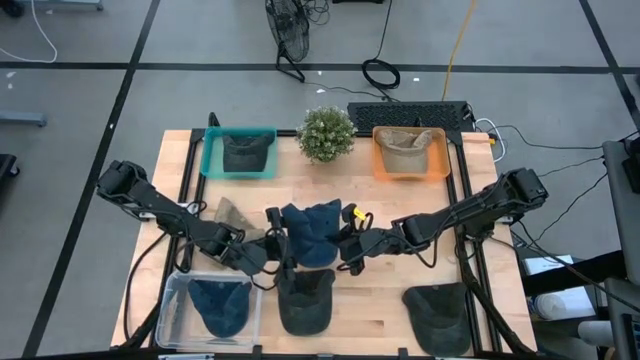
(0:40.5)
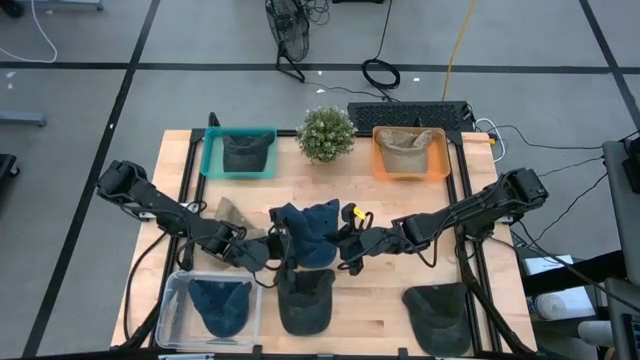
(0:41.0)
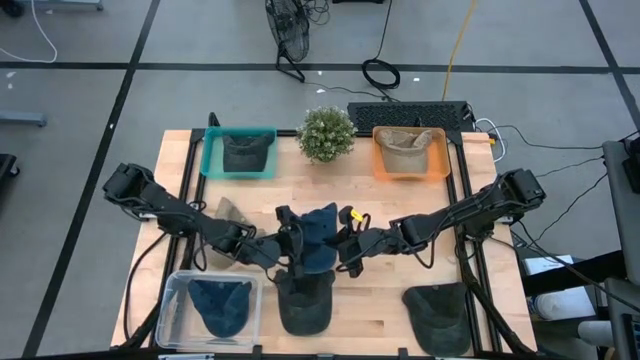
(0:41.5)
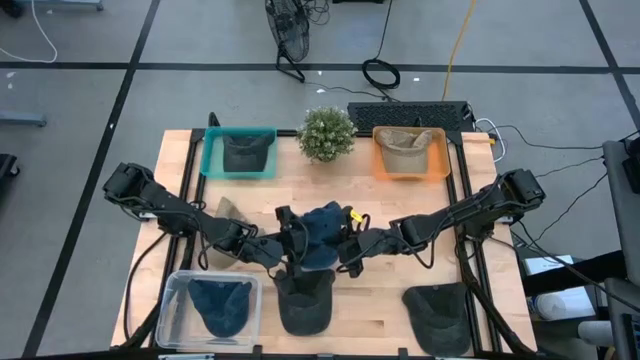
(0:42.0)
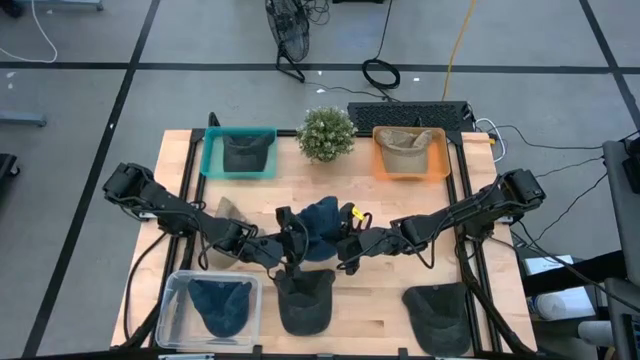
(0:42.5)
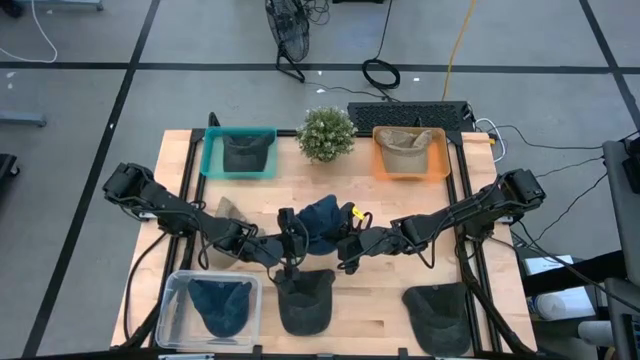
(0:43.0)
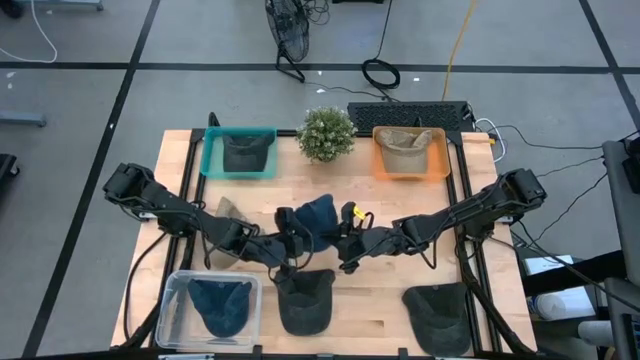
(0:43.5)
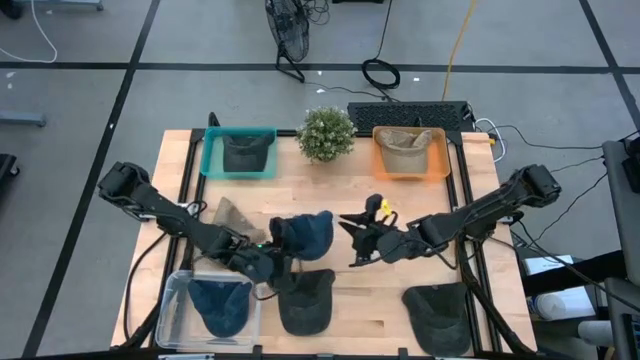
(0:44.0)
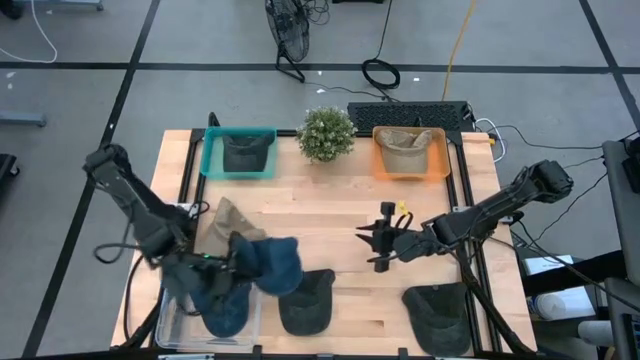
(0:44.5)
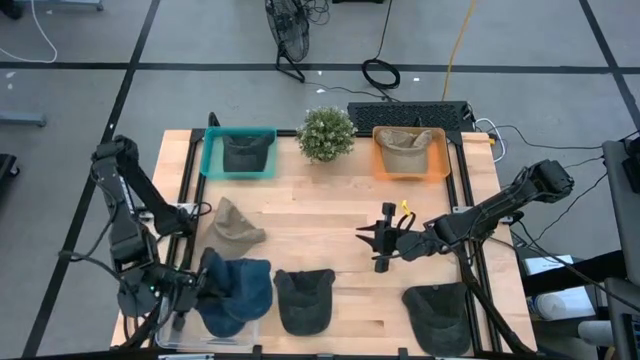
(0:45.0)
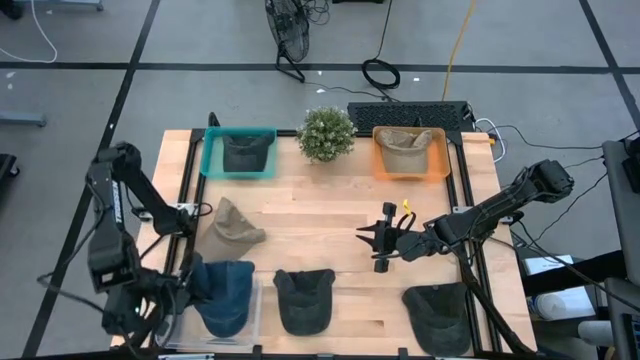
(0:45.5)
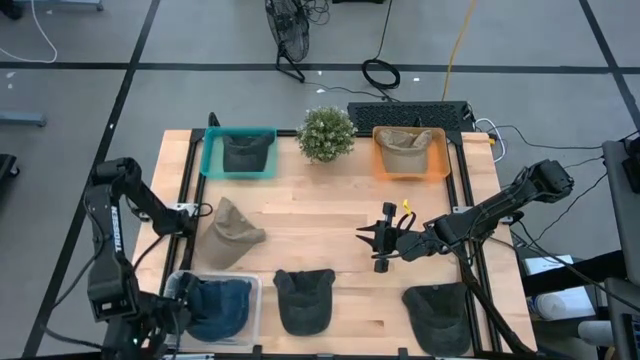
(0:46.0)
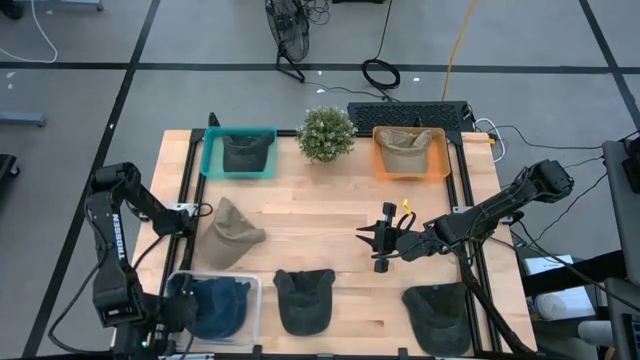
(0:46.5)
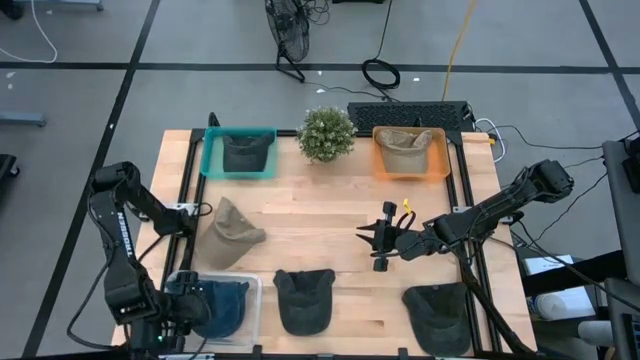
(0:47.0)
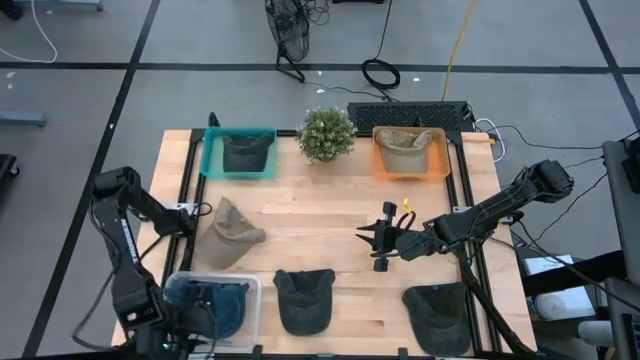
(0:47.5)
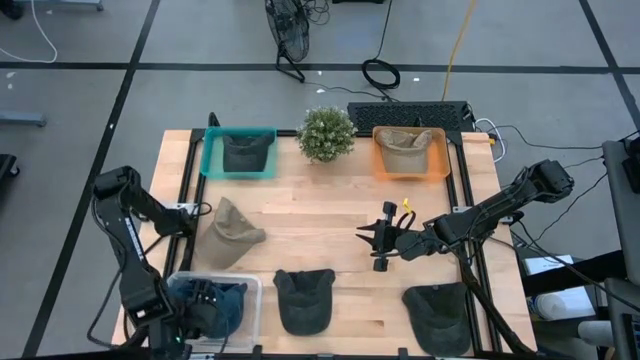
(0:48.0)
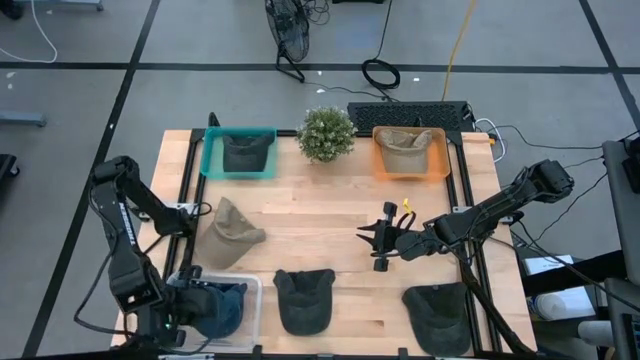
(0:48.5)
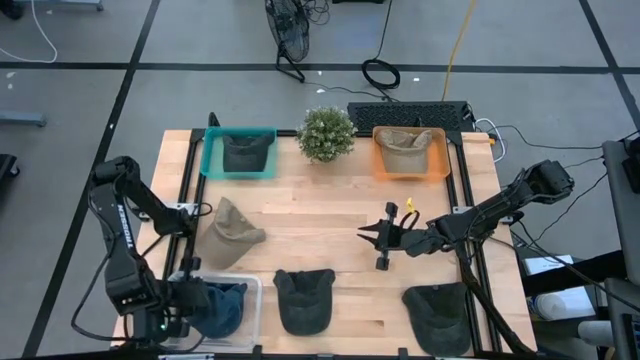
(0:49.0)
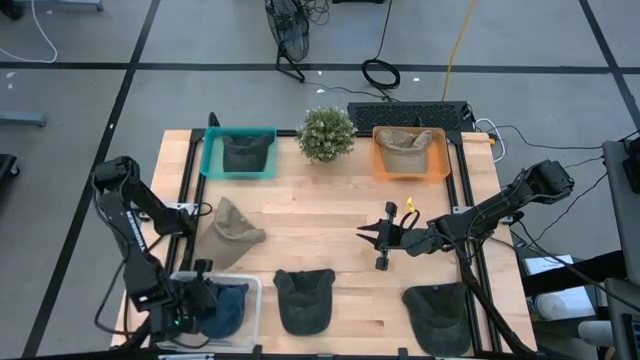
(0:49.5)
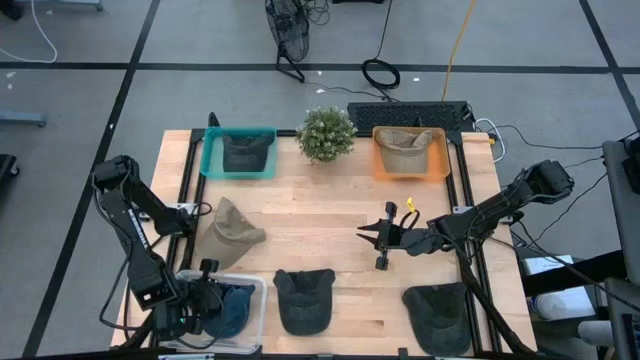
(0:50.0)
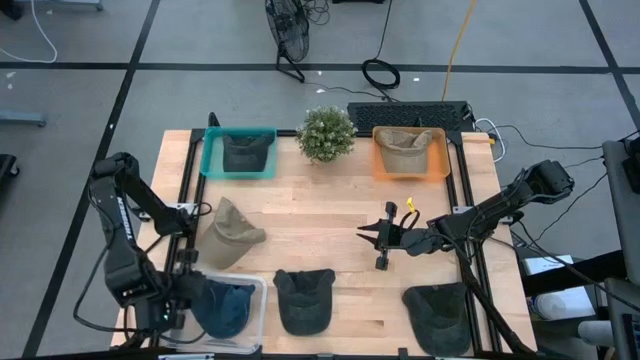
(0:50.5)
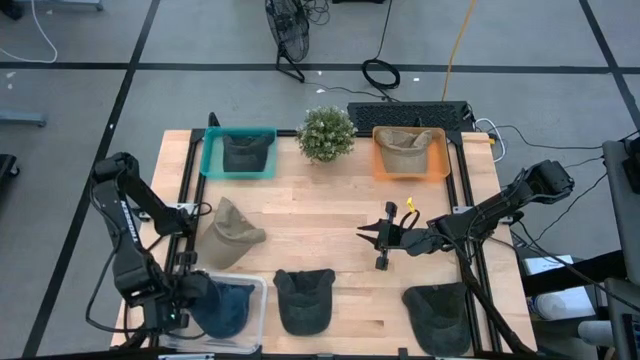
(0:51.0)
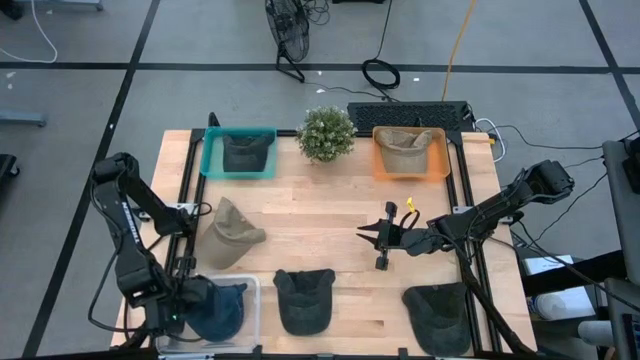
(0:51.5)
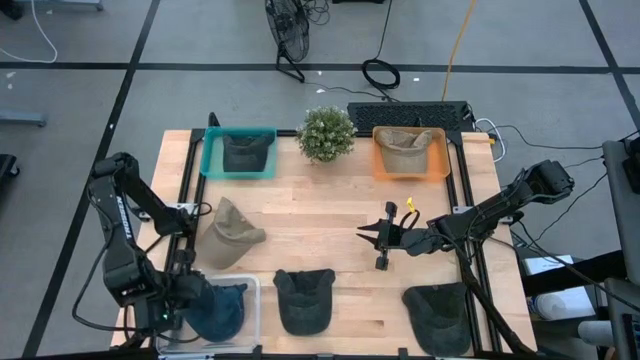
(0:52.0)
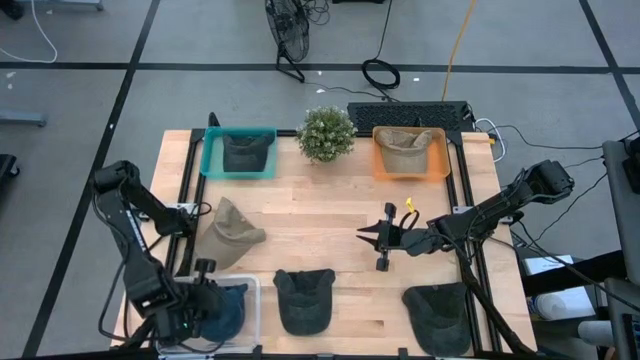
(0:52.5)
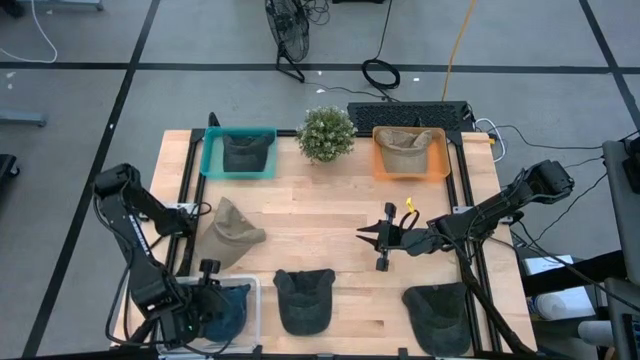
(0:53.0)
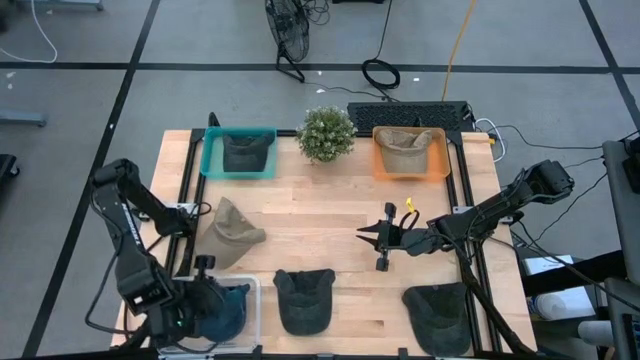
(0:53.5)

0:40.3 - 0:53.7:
Task: Pick & Place hat
Put the blue cap into the transparent bin

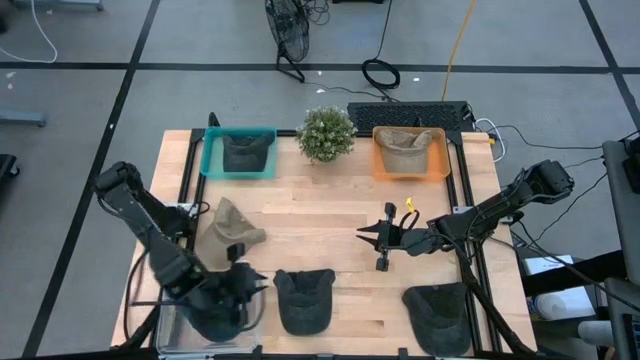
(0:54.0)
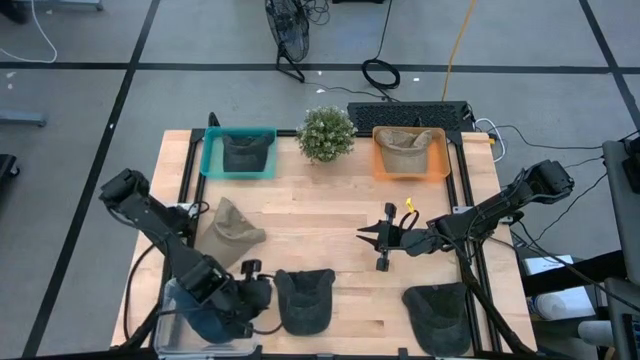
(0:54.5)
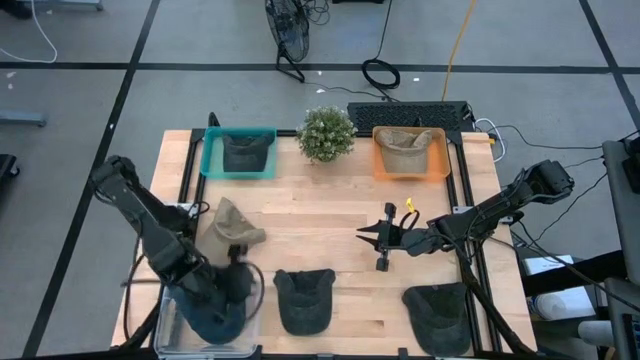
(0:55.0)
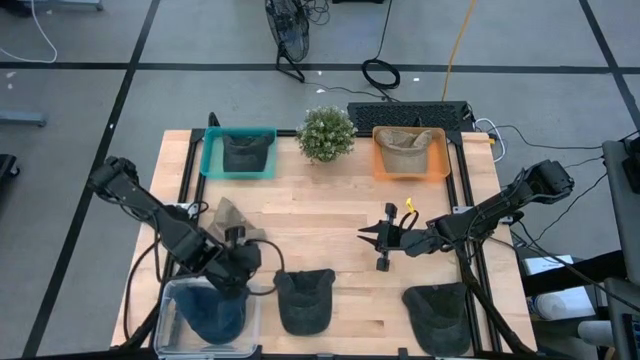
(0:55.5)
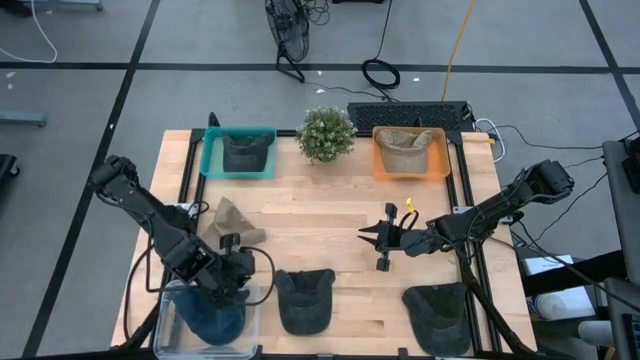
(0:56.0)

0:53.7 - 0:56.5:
Adjust the transparent bin
